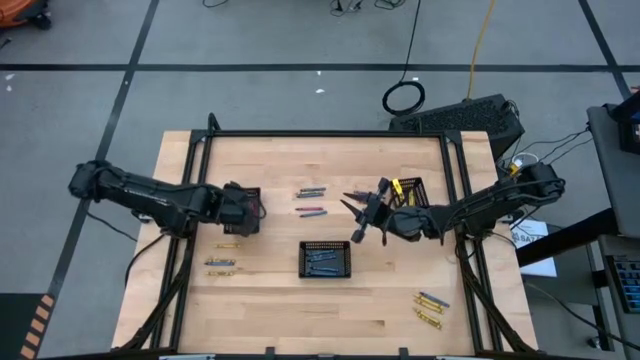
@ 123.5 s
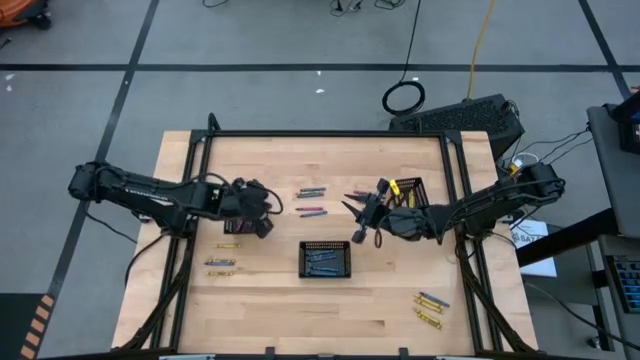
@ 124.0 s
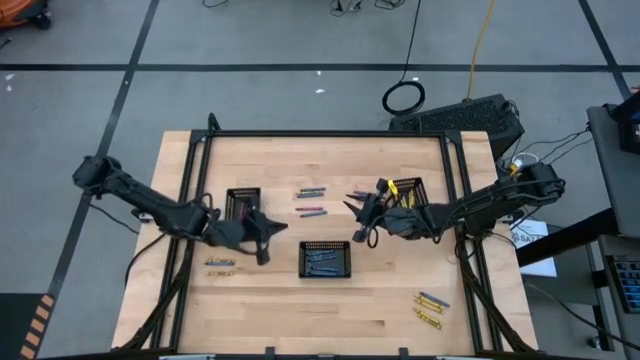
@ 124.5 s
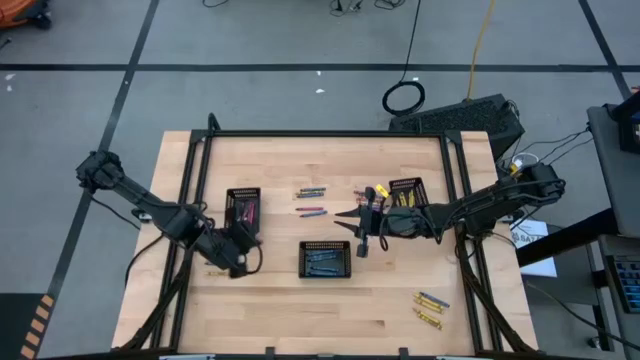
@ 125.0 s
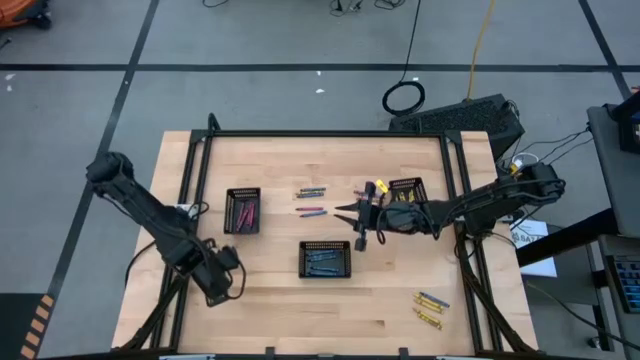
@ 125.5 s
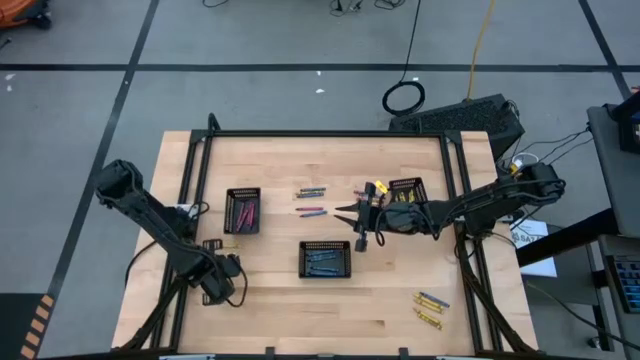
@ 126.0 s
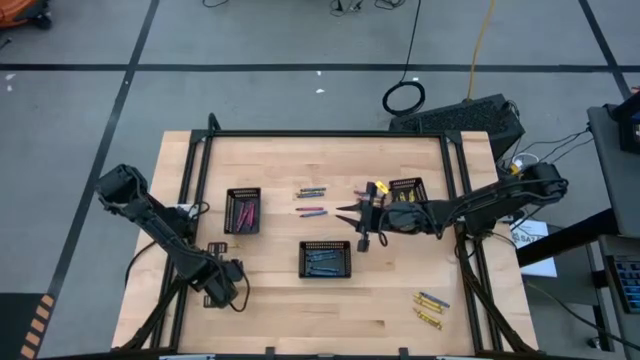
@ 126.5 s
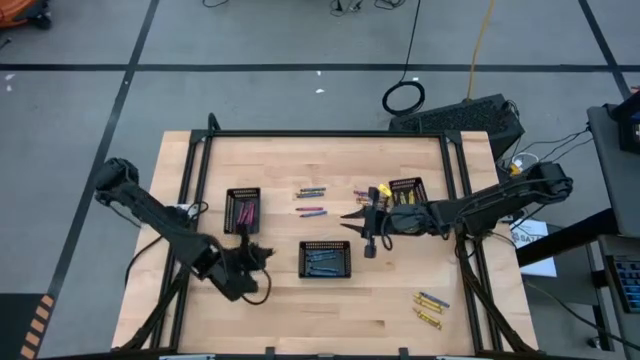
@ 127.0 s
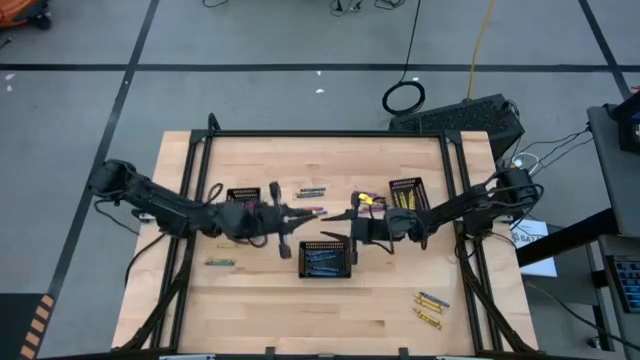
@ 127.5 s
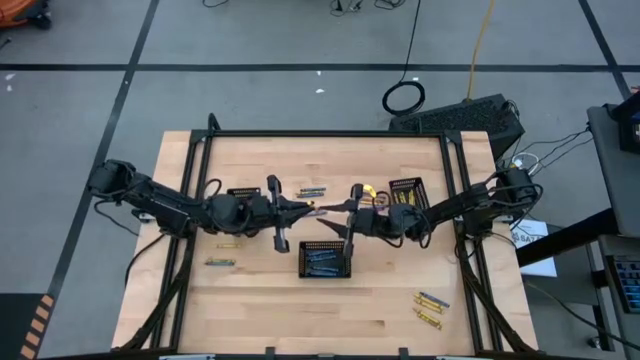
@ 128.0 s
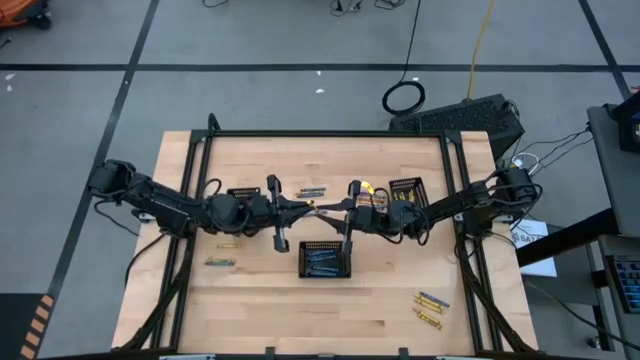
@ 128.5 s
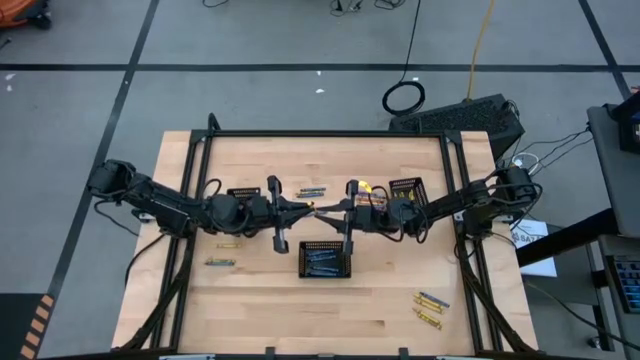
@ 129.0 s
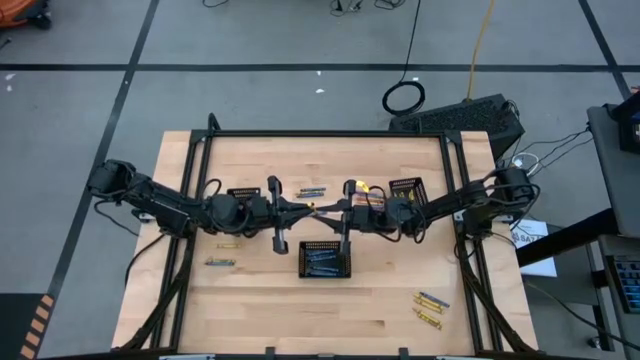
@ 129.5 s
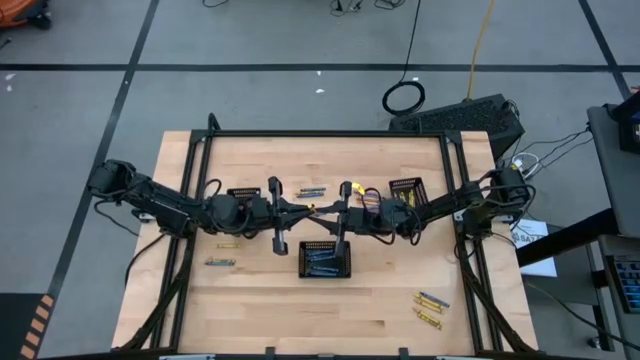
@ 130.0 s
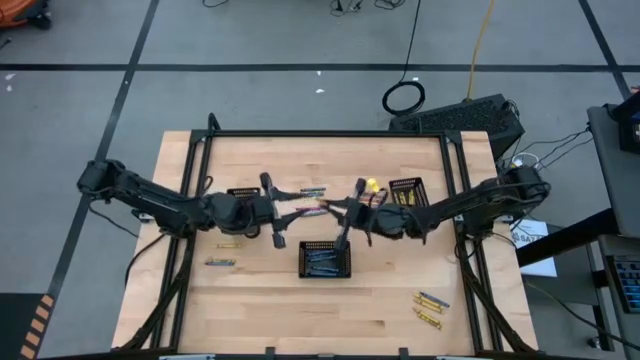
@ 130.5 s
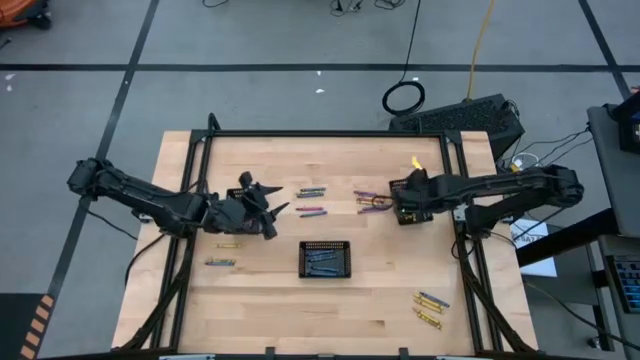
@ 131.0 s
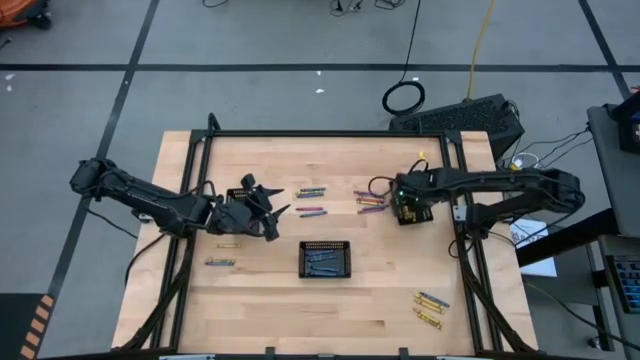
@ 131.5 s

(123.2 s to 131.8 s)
Task: Sort crayons
Put the yellow crayon into the right black basket

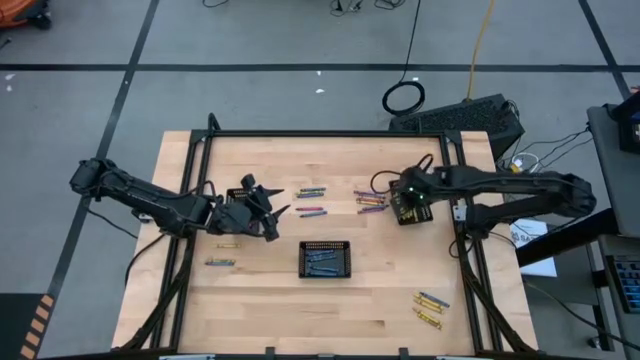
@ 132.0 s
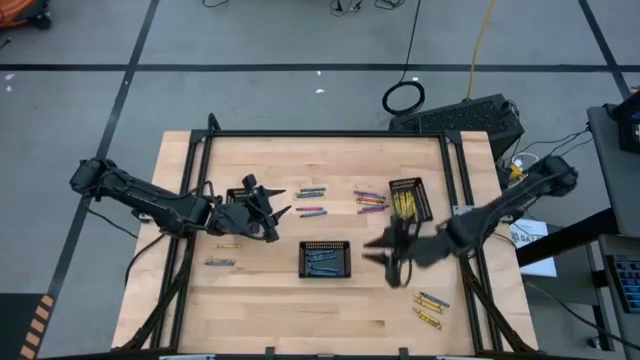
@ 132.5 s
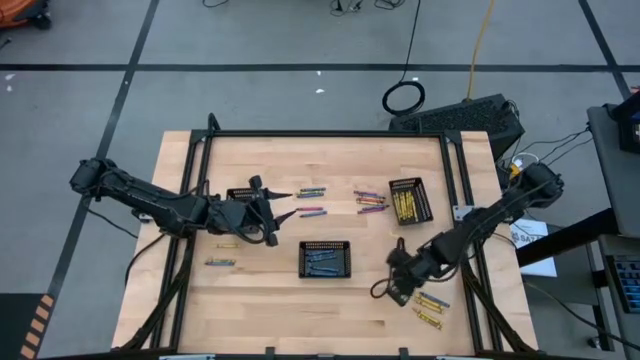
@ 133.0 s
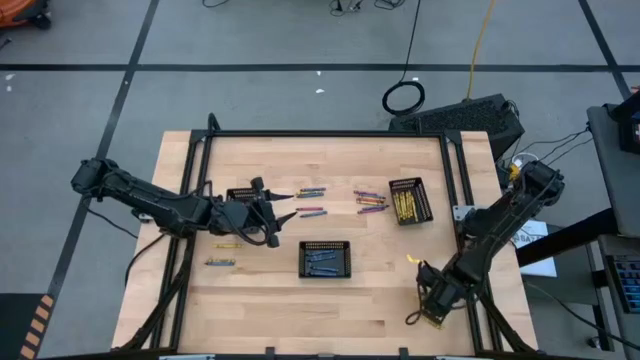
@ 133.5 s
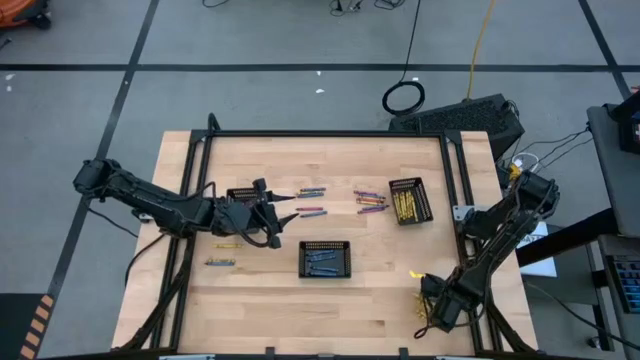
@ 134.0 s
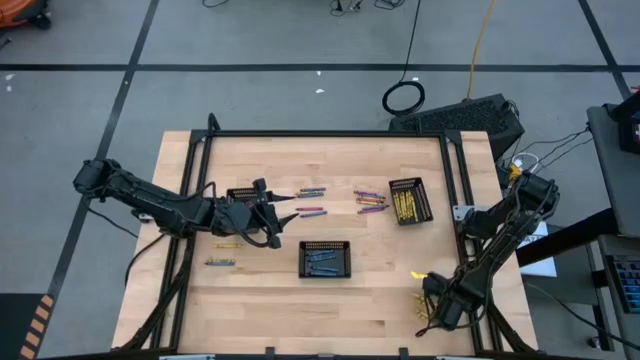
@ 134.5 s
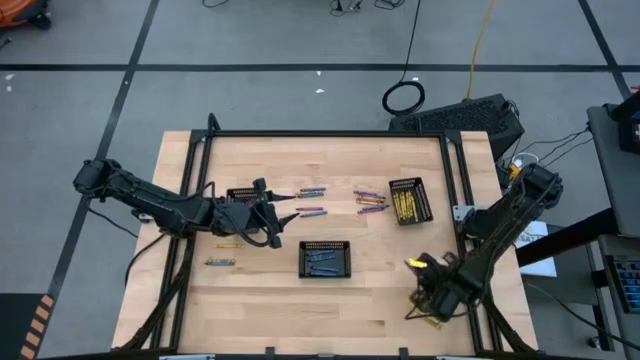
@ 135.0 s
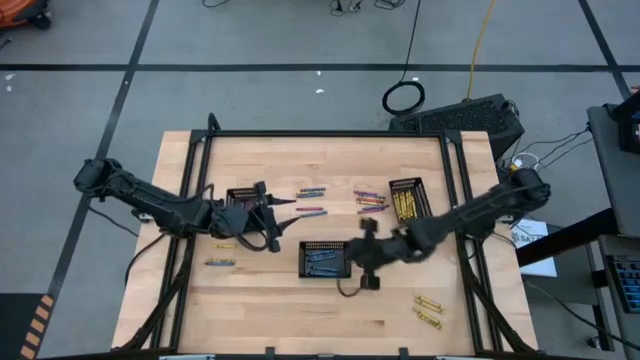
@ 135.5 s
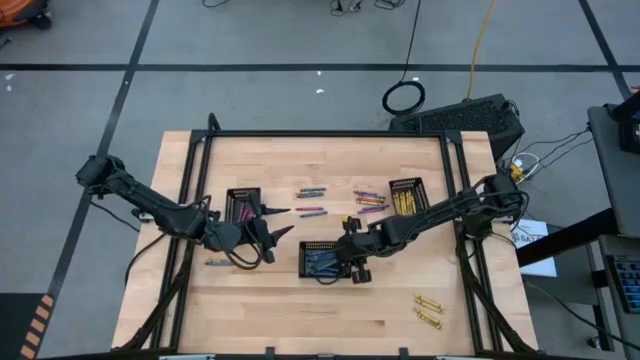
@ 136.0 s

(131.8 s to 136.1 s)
Put the blue crayon into the center black basket

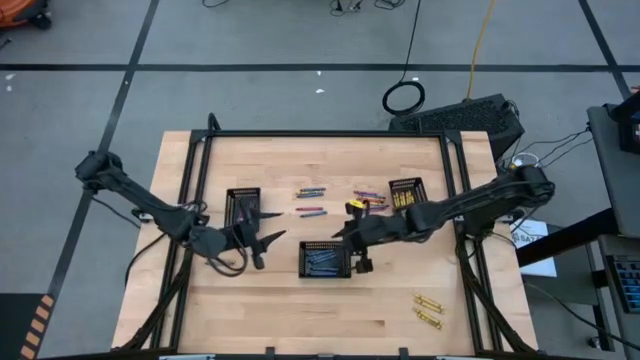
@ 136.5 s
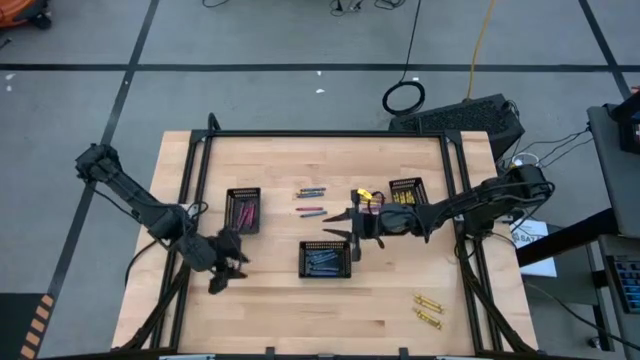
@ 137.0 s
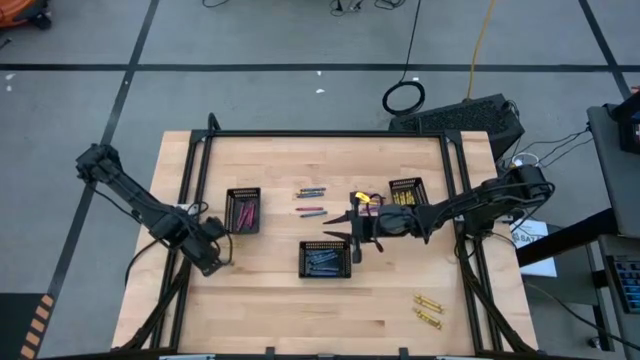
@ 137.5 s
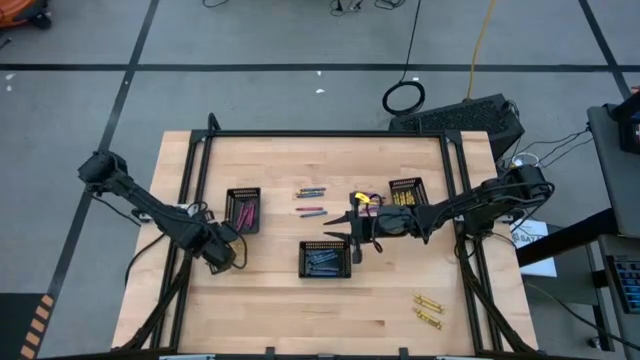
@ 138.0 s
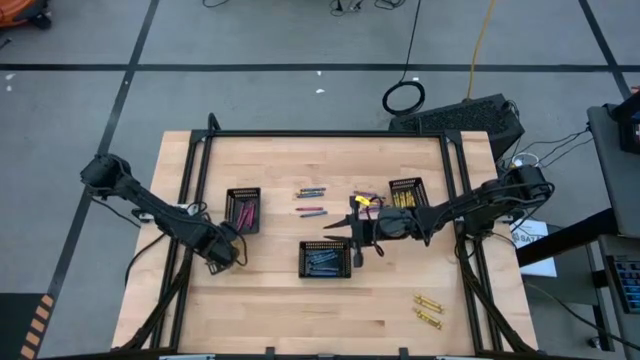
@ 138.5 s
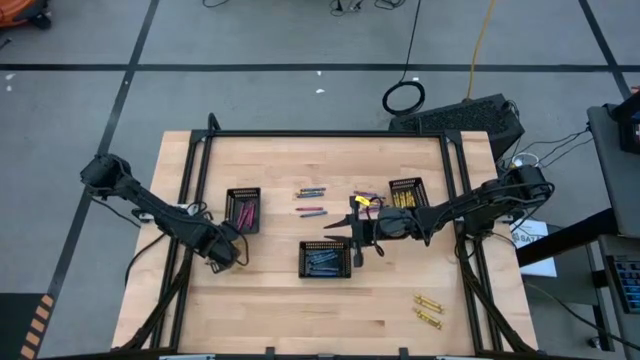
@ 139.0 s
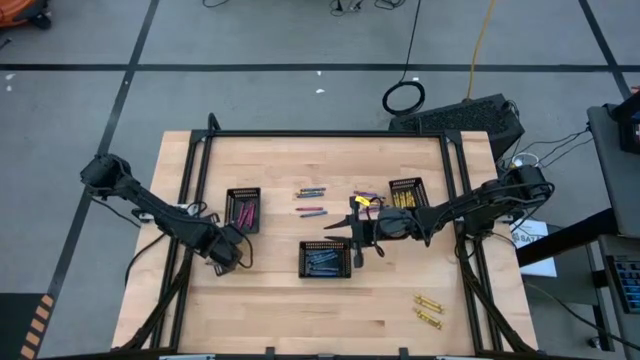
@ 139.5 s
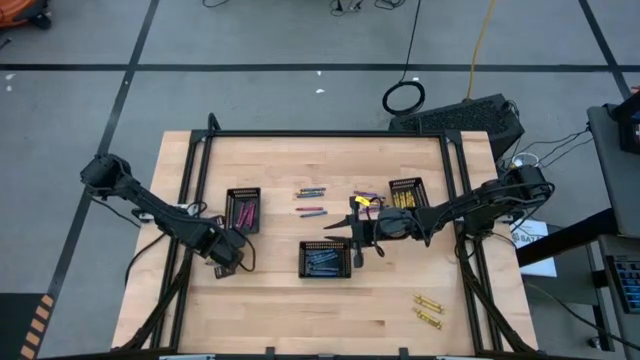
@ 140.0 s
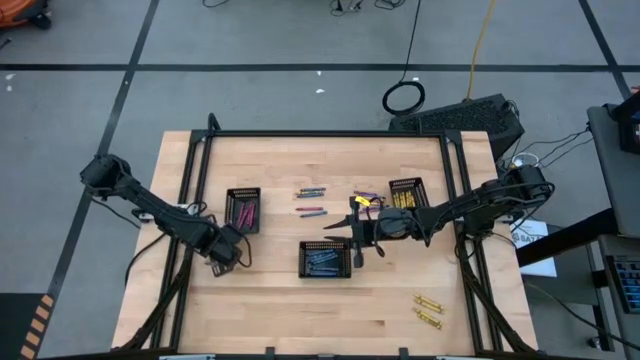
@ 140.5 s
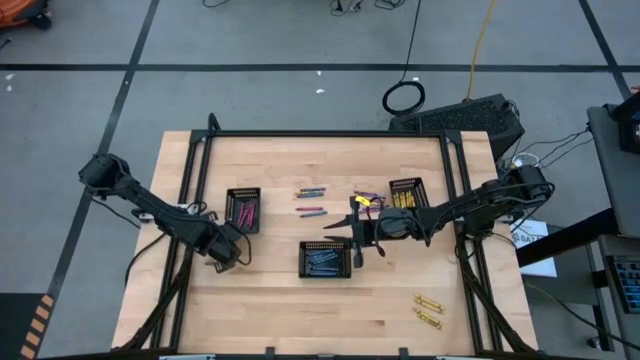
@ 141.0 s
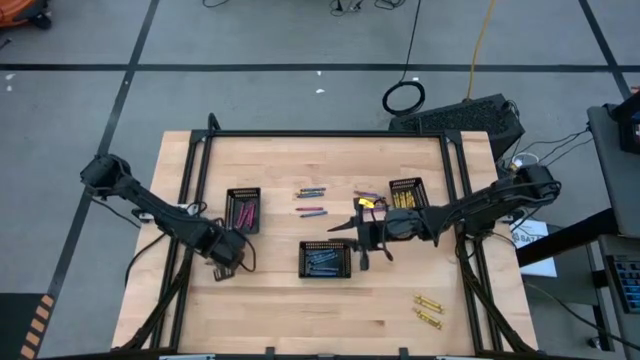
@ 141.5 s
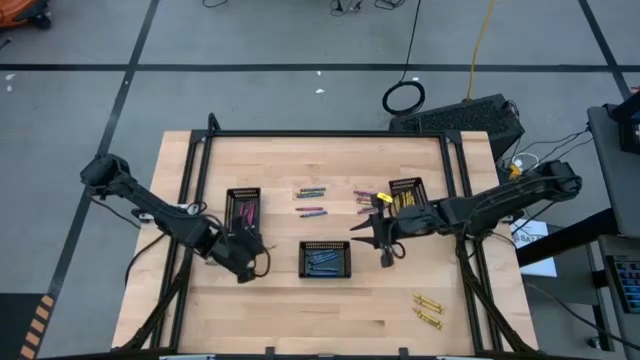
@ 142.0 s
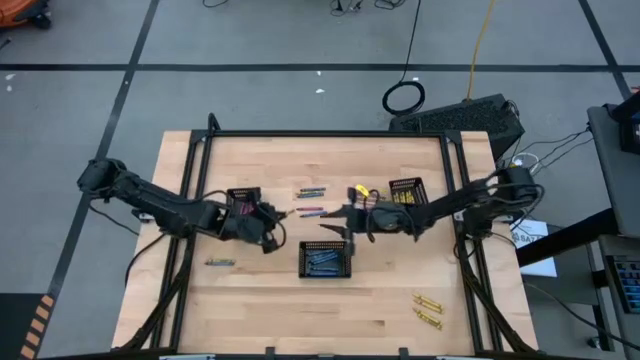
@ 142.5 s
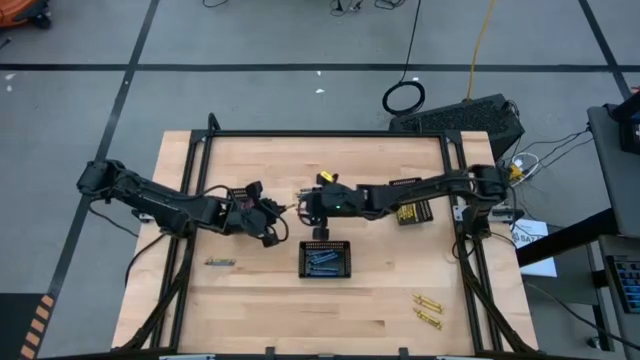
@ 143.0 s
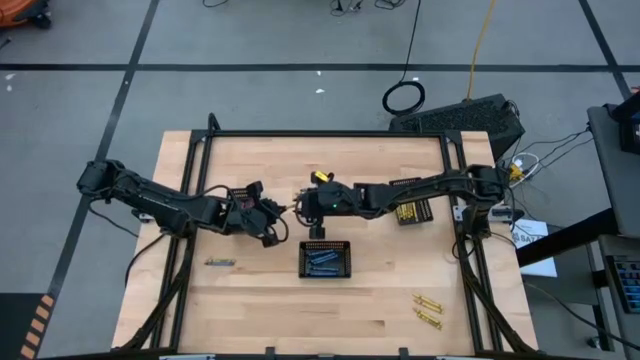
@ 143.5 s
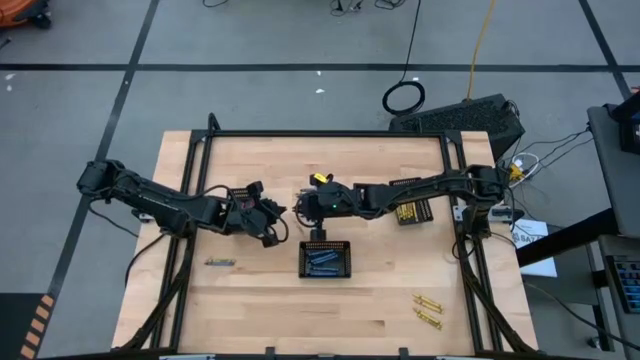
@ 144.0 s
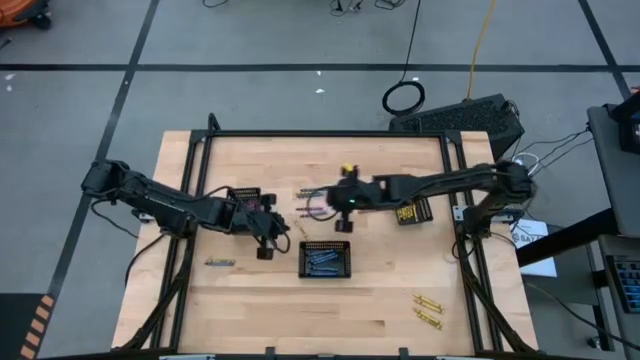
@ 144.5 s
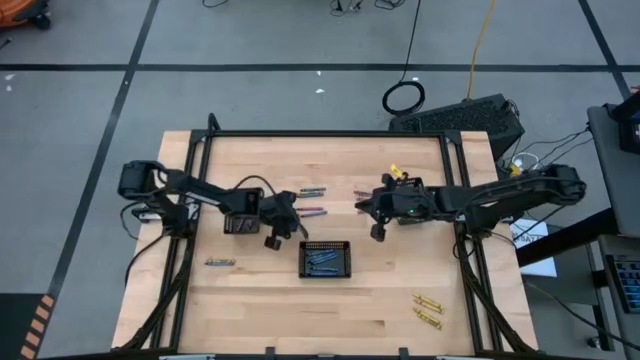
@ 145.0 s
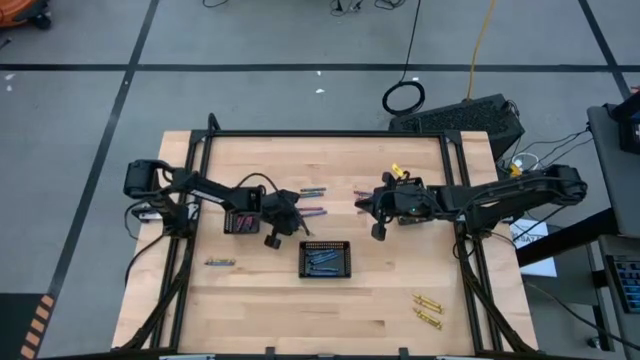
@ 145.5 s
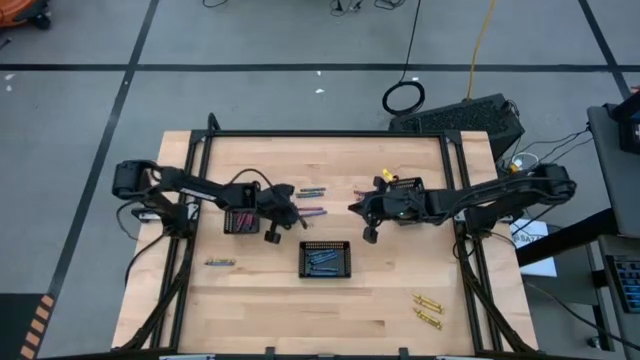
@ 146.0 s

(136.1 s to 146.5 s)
Put the yellow crayon into the right black basket
